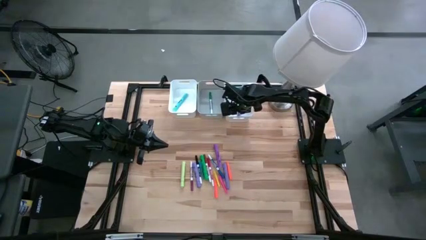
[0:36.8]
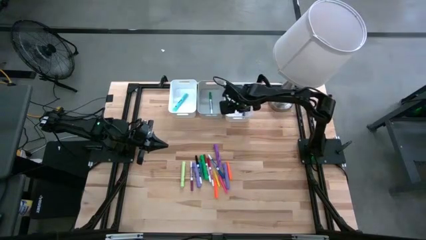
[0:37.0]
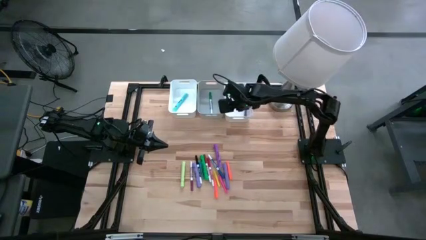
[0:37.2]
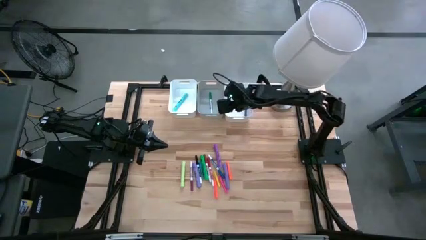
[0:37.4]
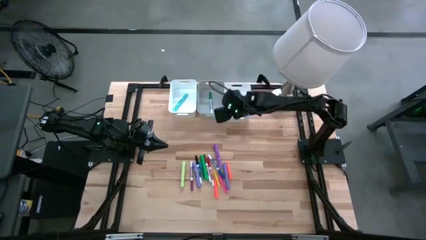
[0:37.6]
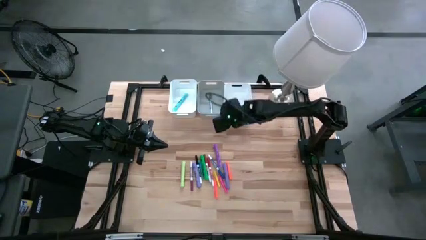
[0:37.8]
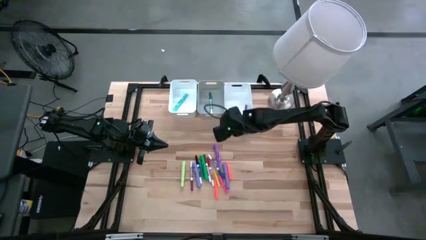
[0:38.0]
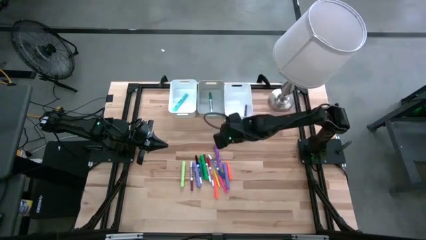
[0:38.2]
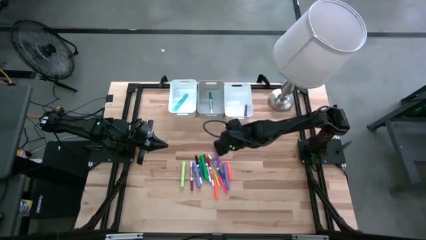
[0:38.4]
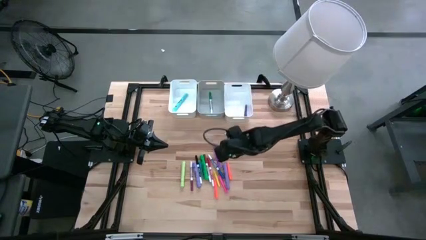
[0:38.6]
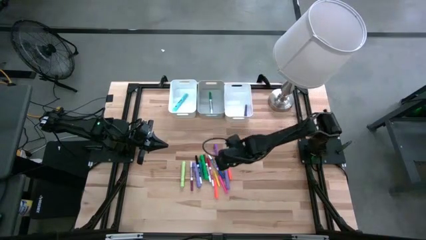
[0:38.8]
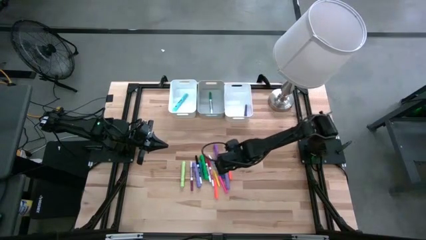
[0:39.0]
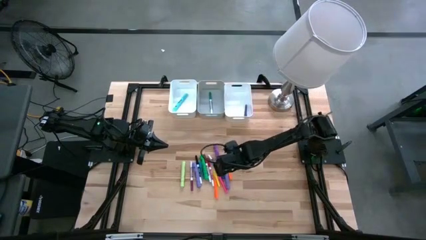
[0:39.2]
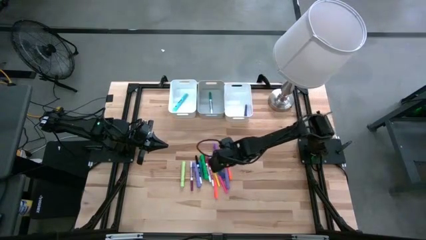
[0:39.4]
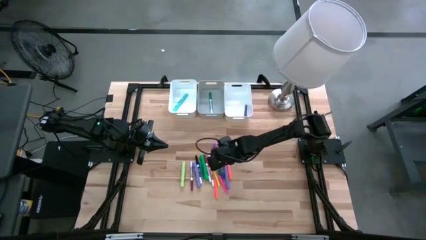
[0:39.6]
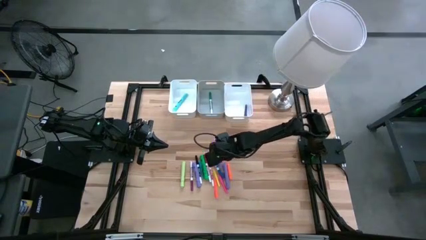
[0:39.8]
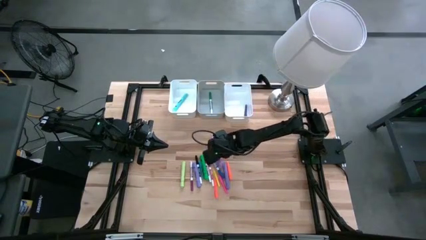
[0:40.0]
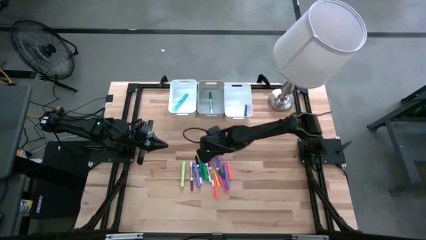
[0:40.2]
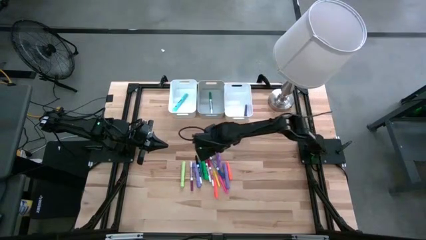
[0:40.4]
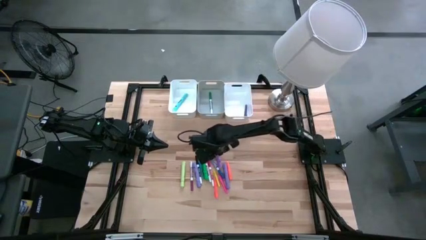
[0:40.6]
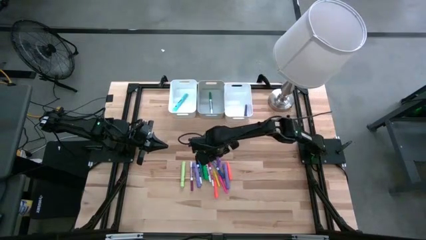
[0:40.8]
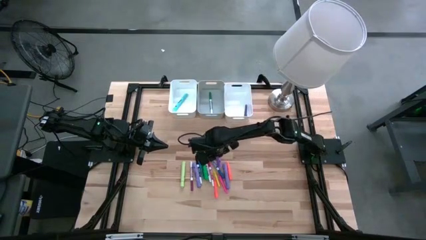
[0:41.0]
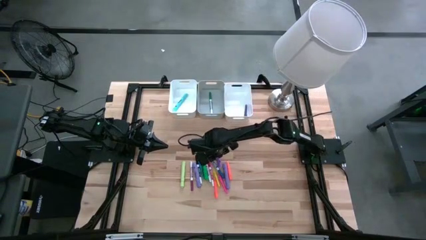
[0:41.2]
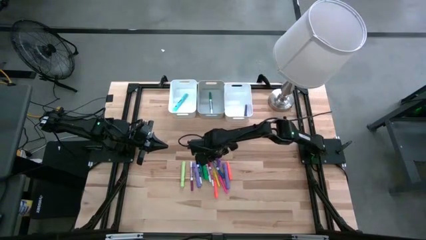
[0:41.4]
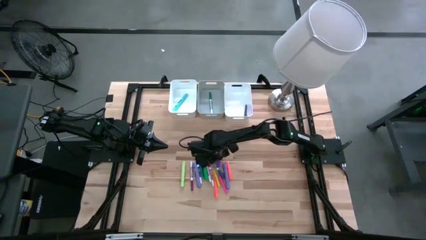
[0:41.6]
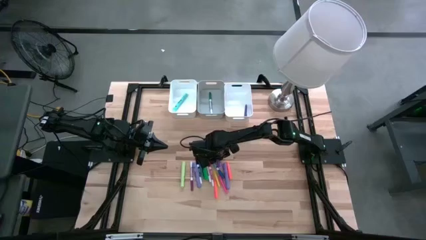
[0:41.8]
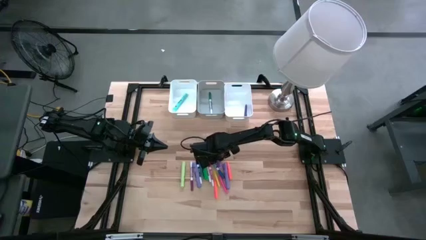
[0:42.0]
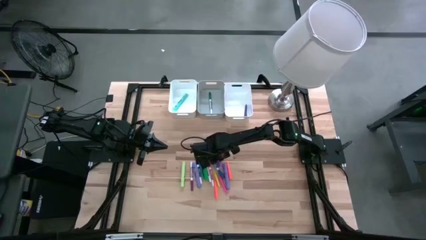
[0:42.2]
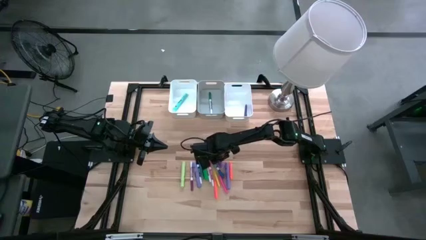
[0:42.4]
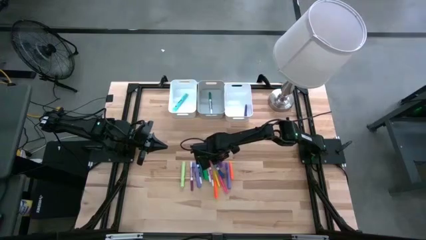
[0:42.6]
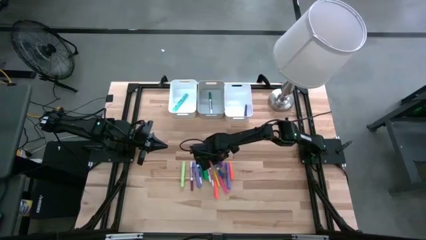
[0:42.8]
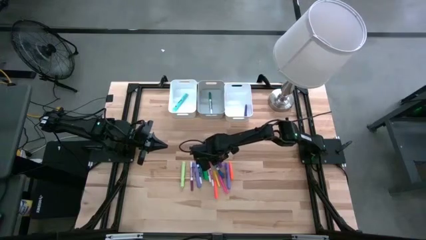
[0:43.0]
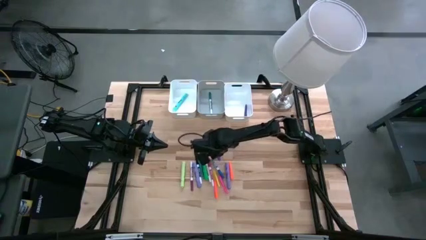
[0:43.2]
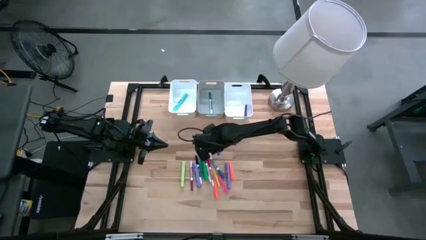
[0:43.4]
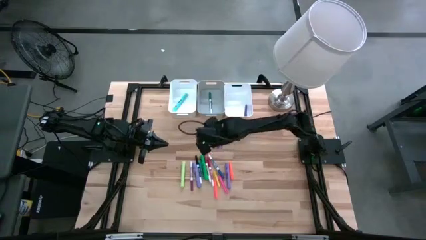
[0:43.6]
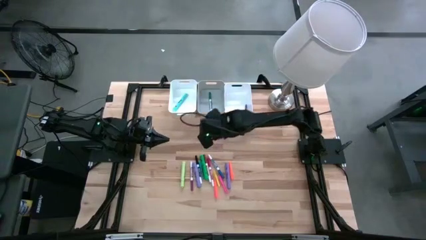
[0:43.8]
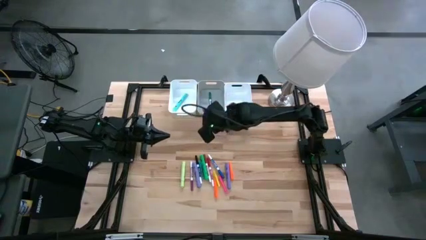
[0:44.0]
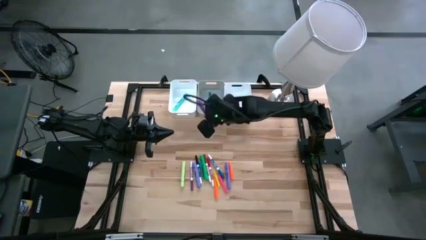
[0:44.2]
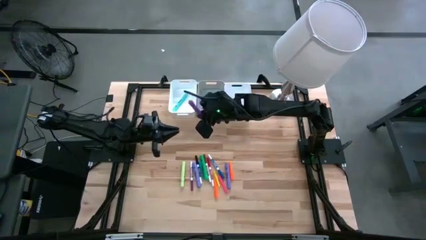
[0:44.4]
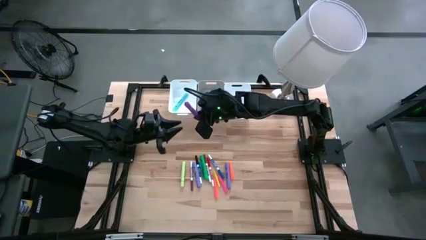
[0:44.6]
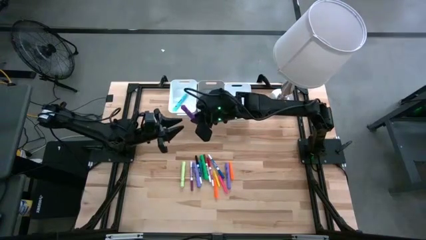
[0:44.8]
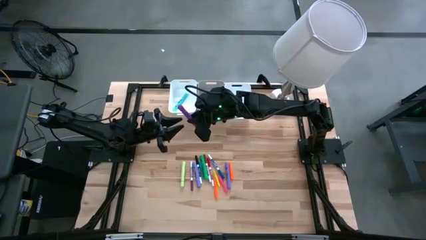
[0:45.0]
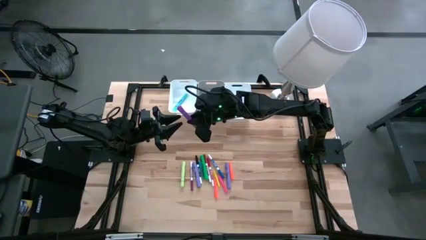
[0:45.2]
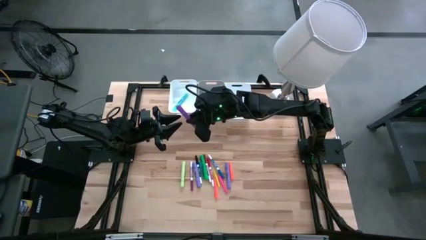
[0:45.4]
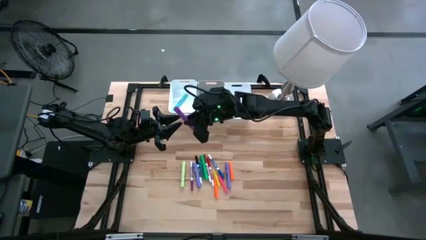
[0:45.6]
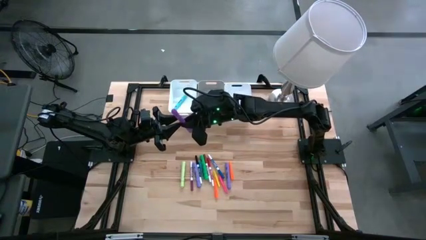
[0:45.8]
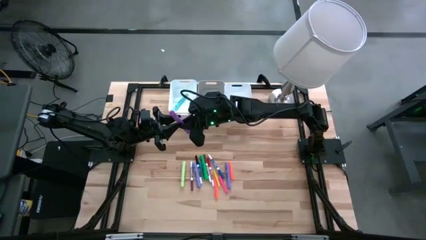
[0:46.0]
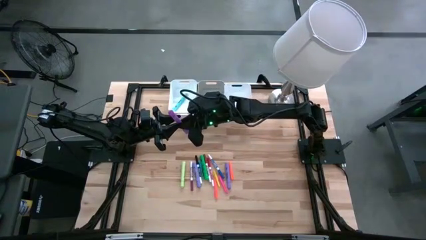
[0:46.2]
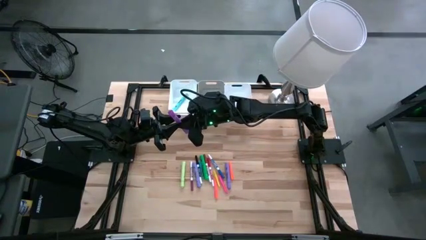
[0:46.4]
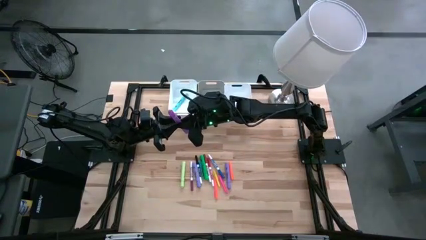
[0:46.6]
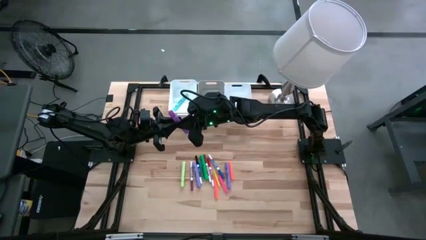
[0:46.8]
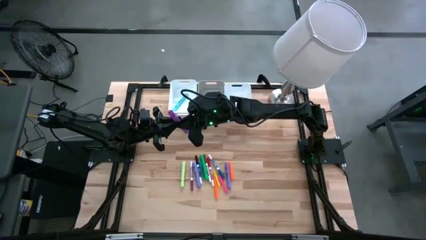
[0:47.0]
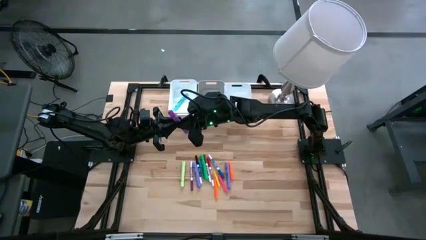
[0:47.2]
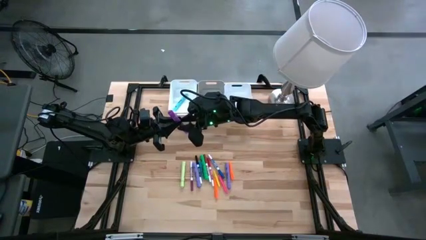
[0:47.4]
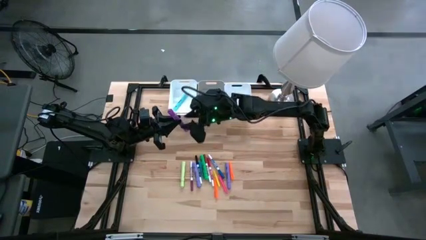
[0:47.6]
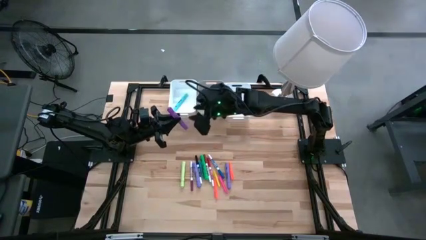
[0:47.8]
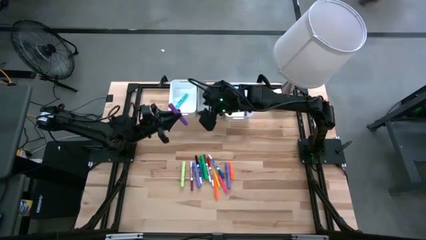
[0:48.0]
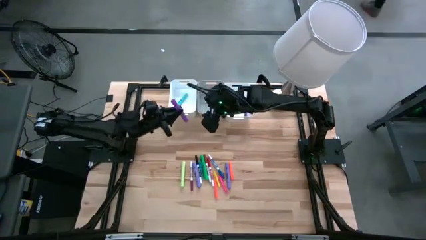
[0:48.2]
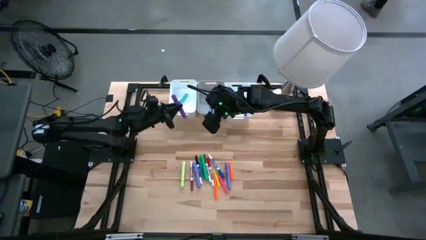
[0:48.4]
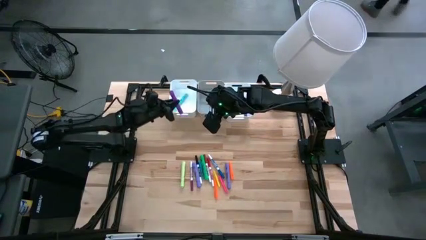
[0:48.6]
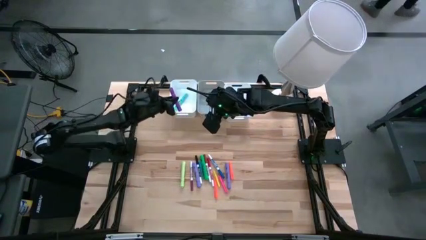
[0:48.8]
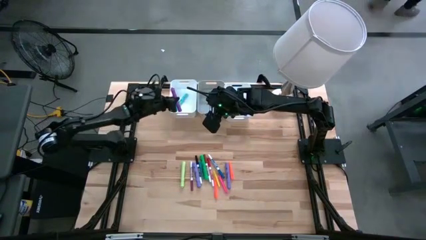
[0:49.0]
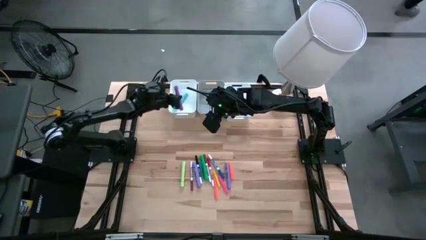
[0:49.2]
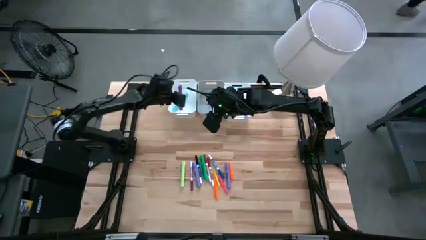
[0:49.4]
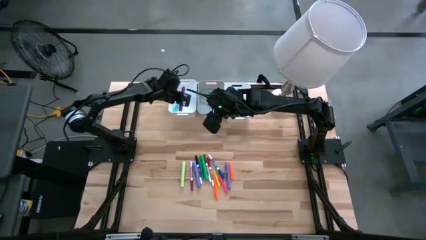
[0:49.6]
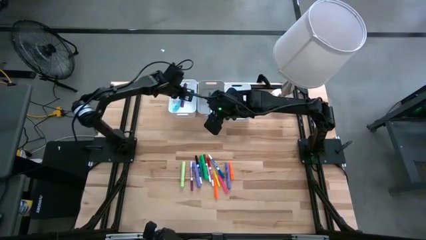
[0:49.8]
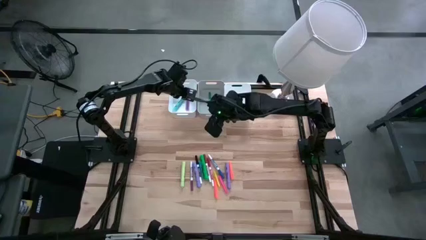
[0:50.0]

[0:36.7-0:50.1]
Task: Pick & Place Markers
Put the violet highlighter pen into the left white bin

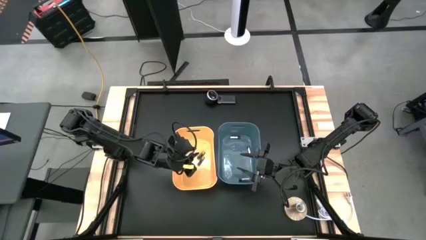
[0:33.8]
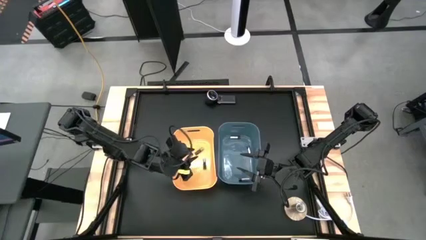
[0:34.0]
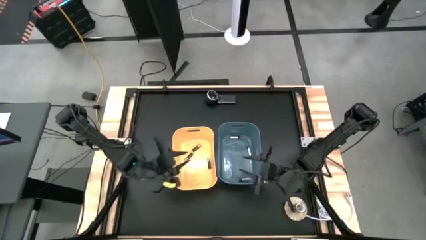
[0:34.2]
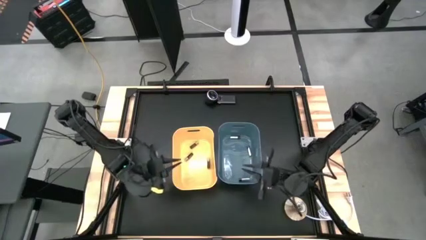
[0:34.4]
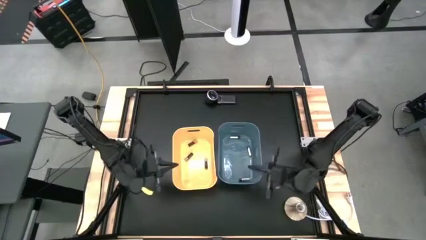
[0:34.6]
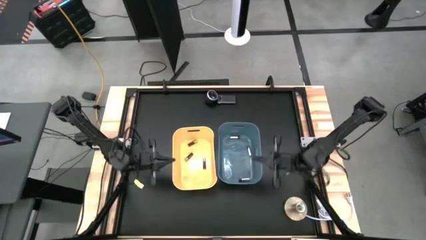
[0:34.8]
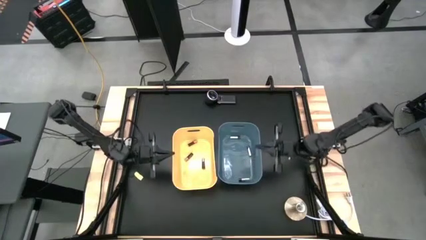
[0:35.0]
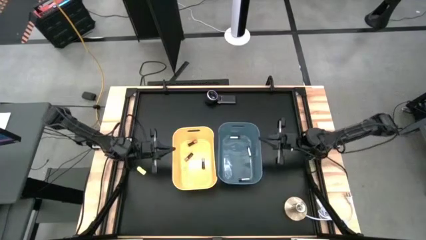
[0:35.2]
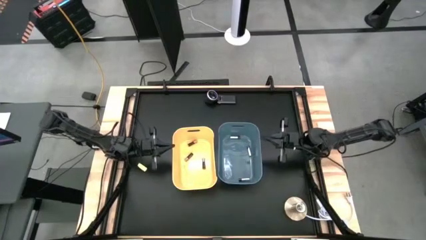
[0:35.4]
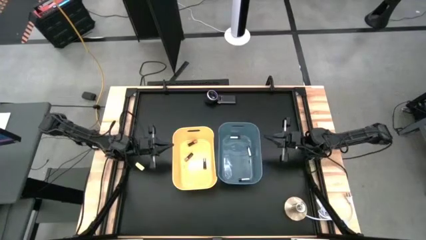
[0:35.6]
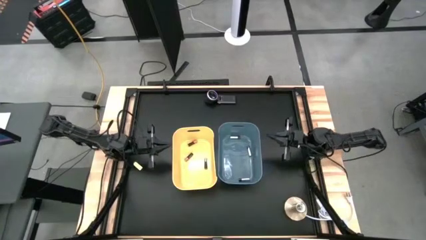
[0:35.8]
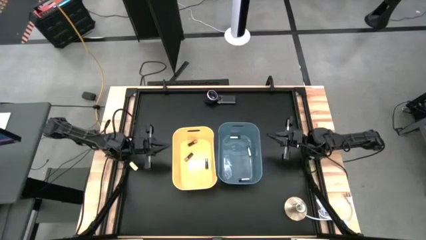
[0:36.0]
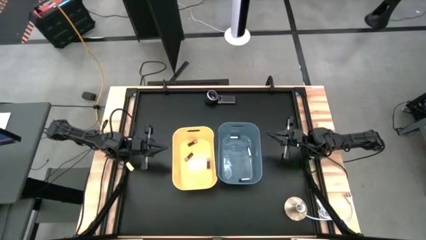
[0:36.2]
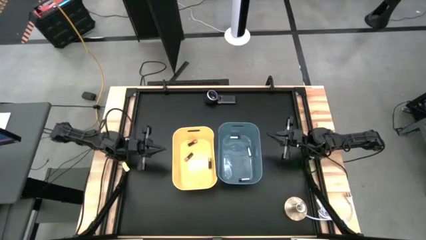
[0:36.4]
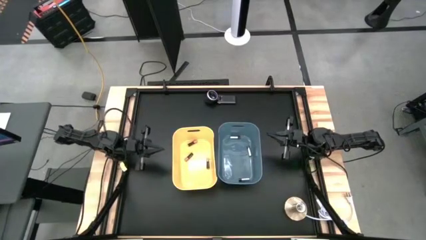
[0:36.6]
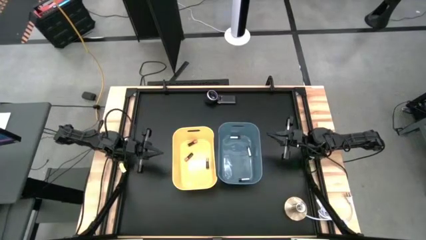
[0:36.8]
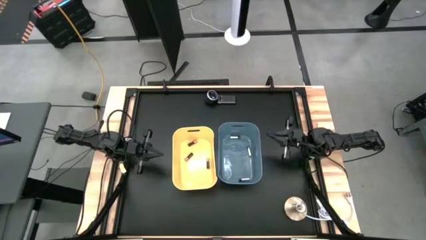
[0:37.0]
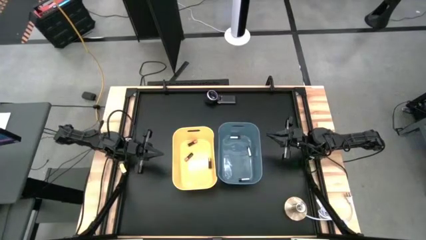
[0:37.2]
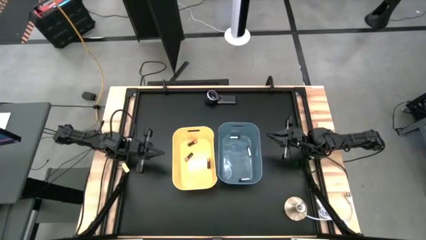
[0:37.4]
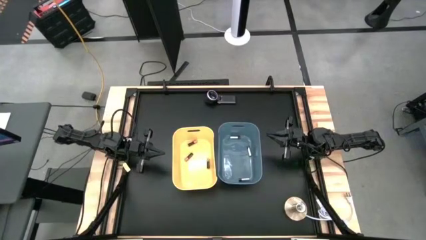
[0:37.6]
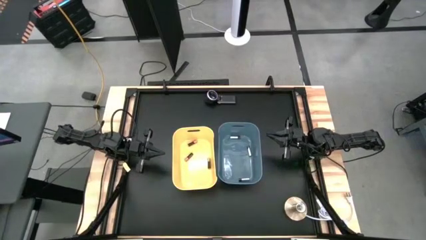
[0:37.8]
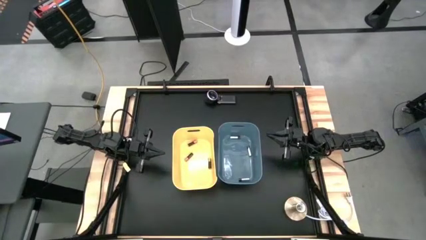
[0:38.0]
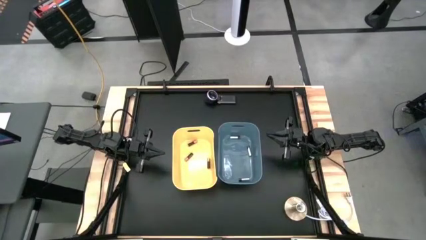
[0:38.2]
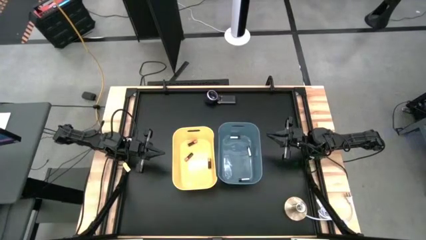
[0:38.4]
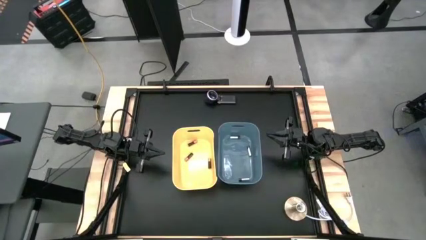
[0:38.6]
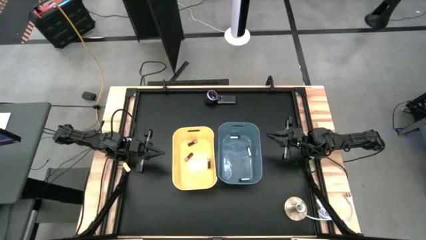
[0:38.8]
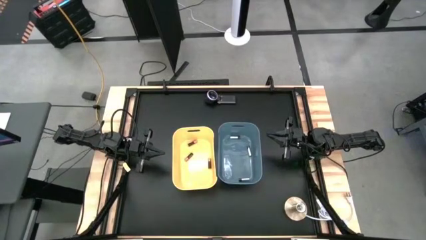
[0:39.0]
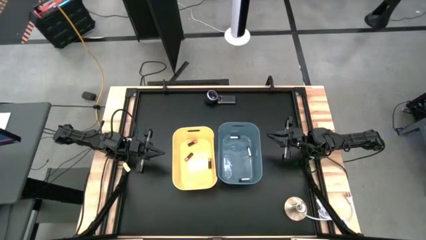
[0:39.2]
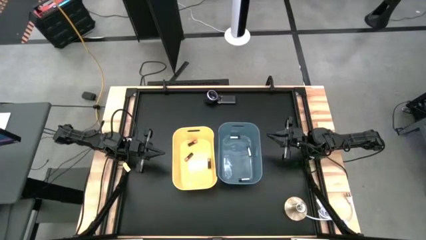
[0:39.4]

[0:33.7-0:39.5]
Task: Sort batteries
Return to Home Position
